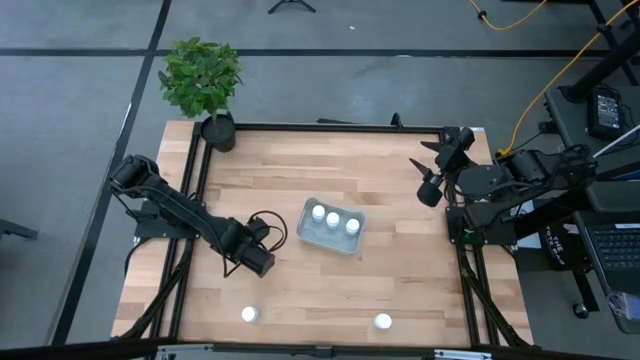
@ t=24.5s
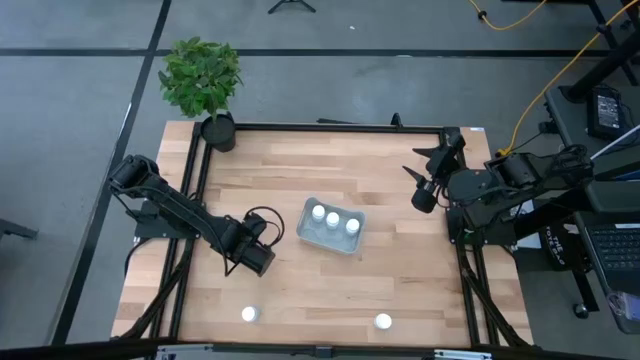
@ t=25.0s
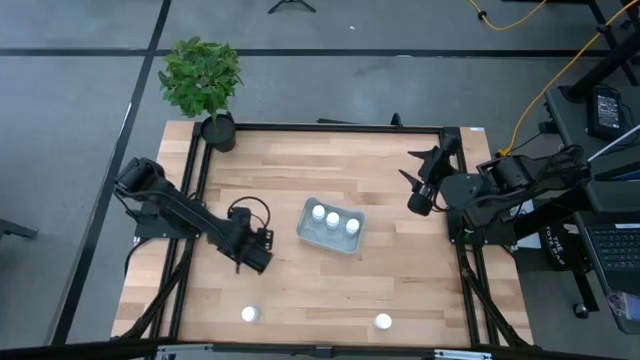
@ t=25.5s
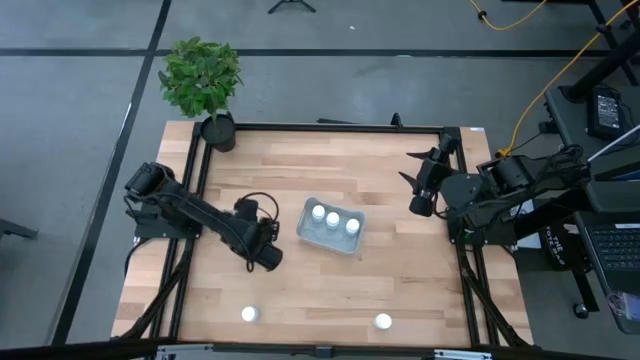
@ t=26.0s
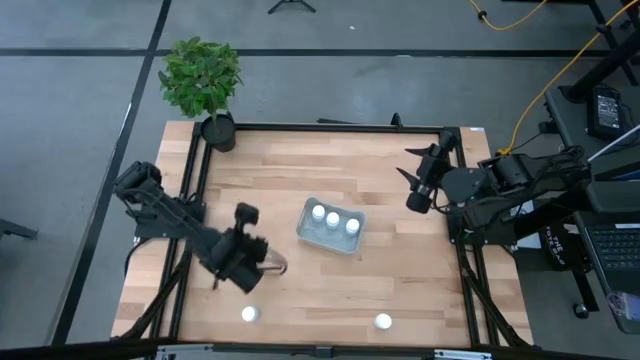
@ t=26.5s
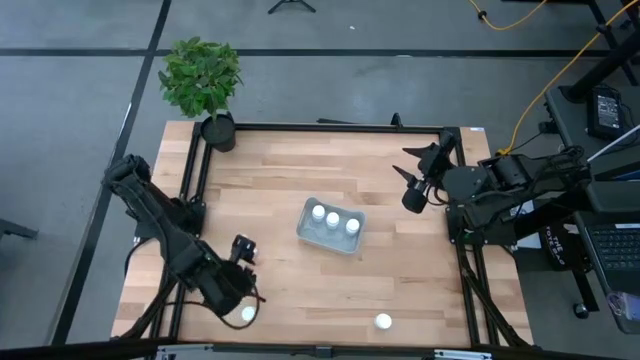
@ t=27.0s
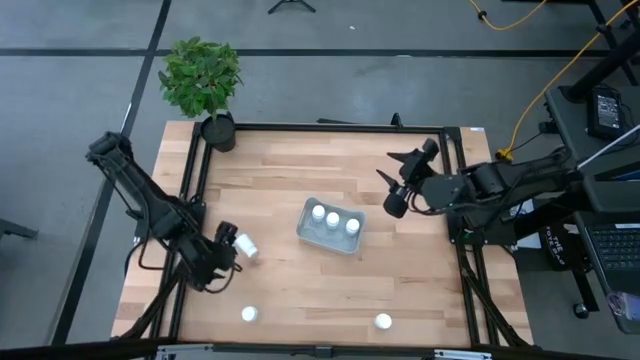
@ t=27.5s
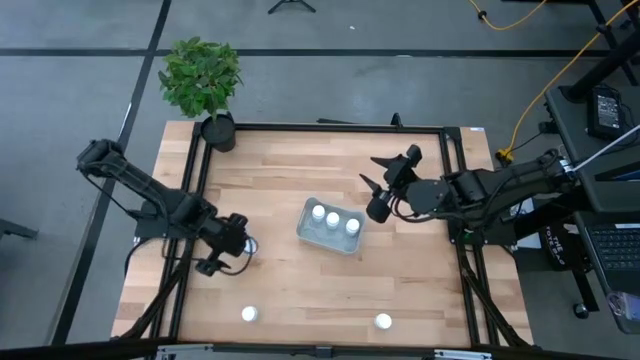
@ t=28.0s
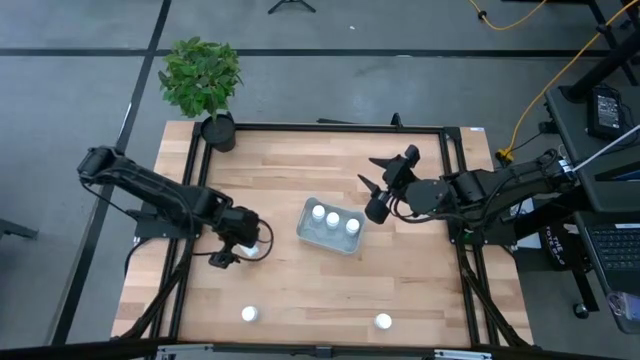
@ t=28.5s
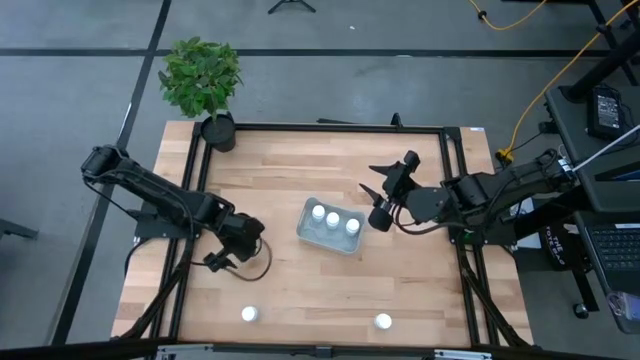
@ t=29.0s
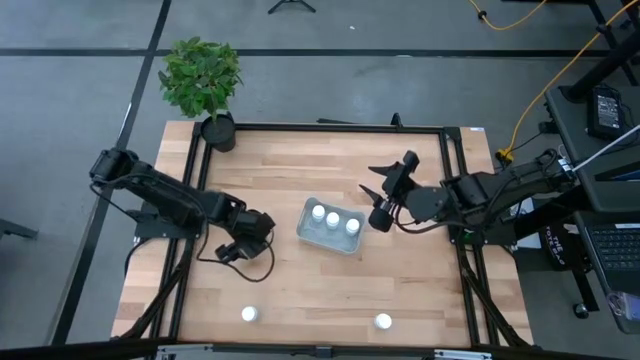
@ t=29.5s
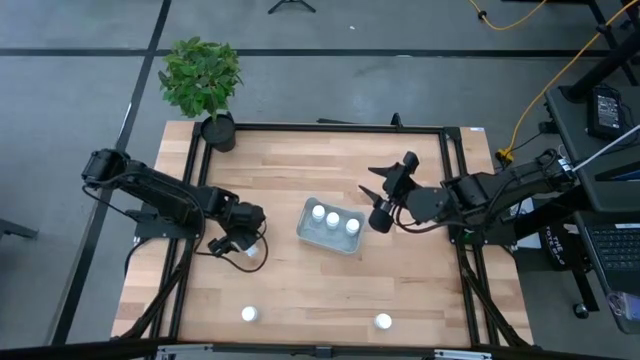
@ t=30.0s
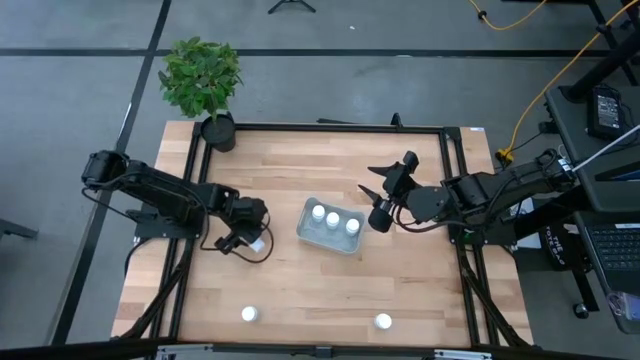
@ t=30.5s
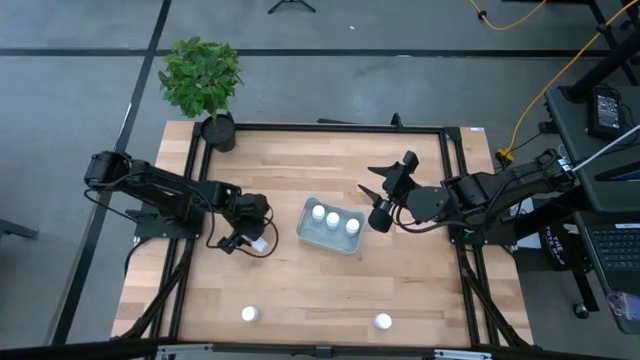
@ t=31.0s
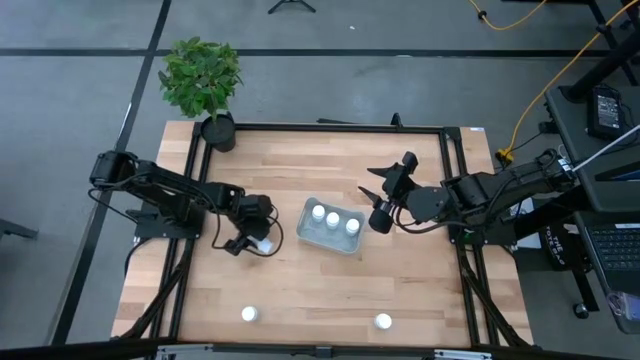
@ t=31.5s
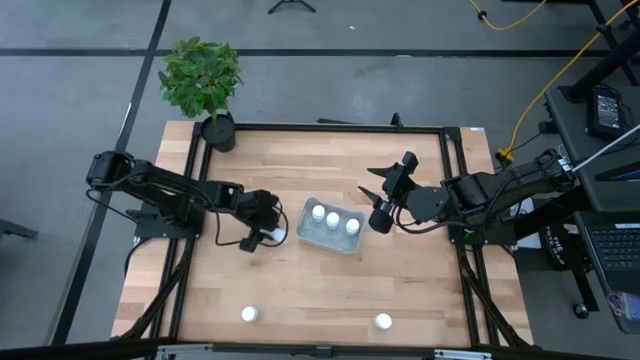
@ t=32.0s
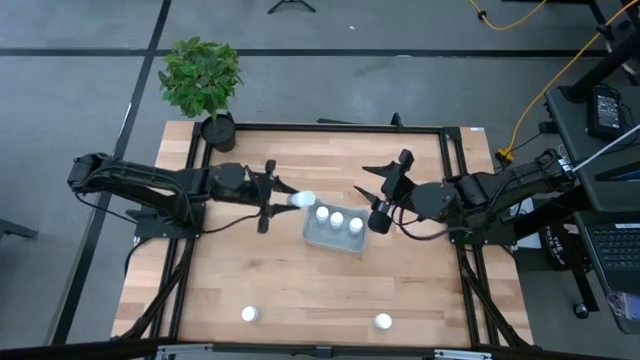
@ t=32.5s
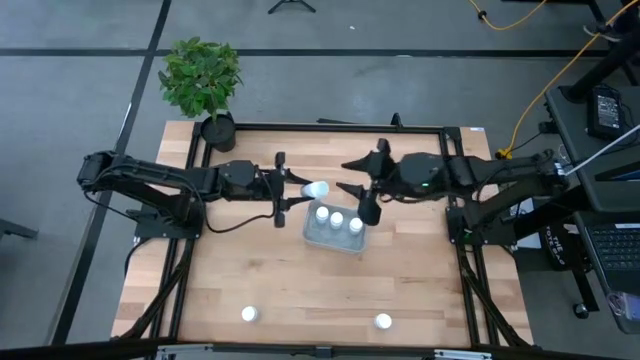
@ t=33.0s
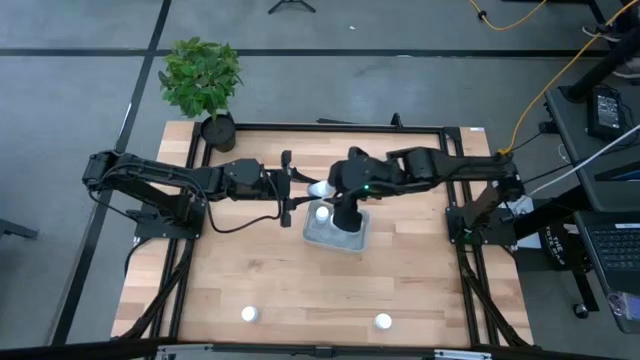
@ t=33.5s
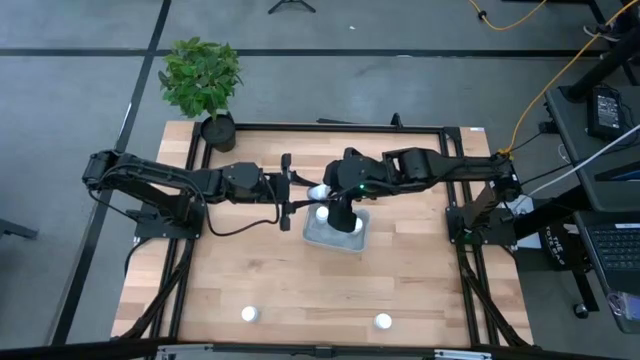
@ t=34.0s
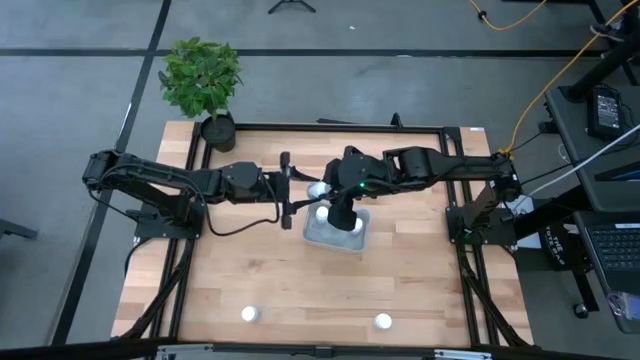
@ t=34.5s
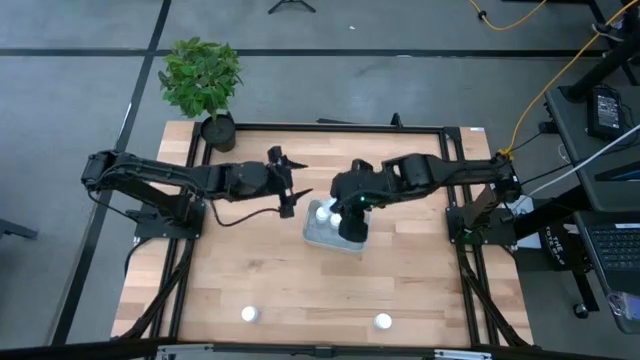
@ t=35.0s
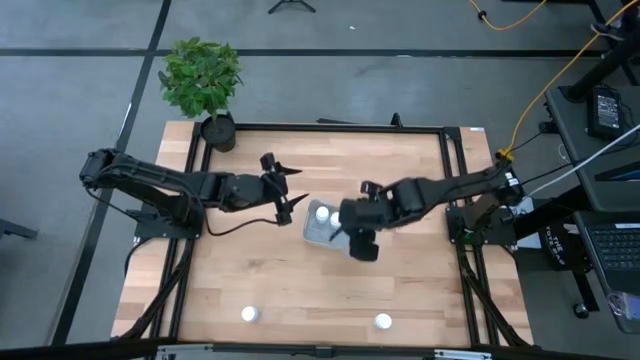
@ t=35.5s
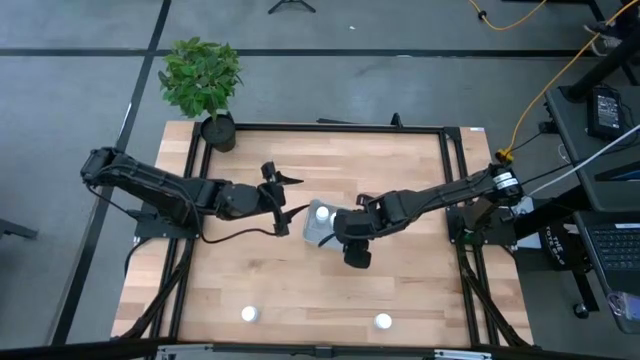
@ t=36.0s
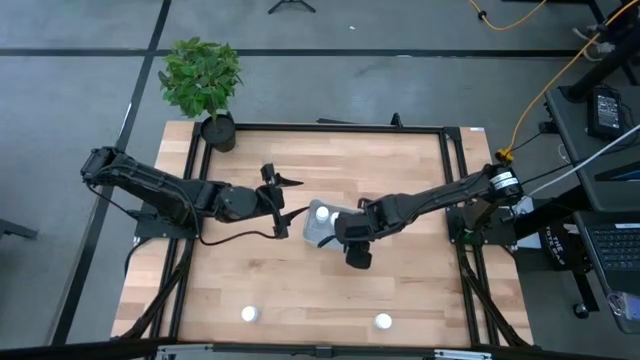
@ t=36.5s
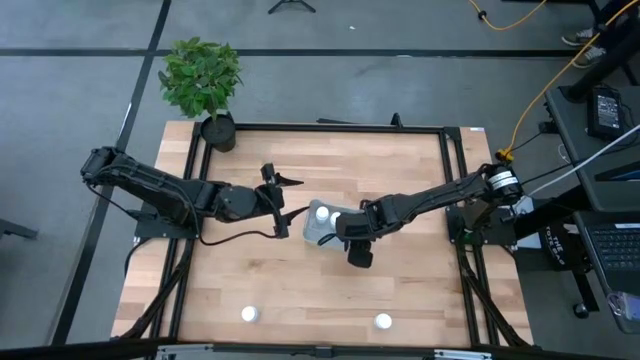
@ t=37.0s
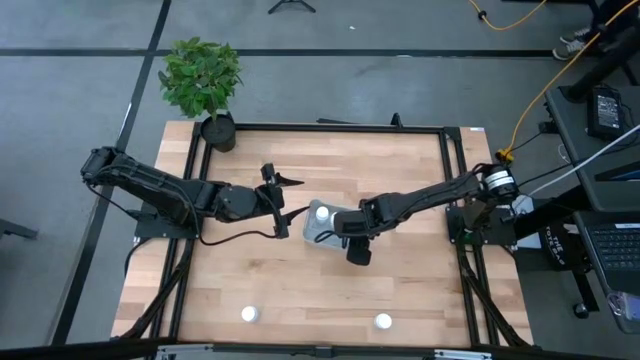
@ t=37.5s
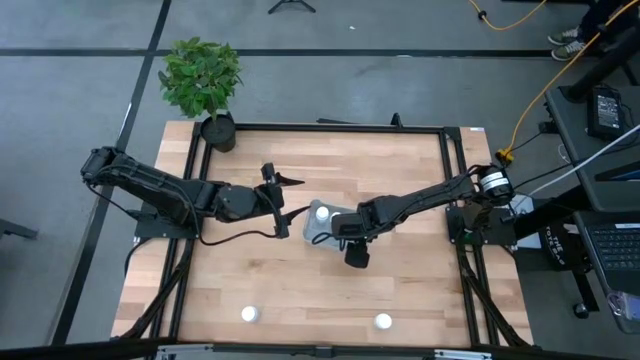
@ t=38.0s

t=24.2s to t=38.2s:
Task: Pick and place pill bottles into a basket
Put the white pill bottle into the gray bin

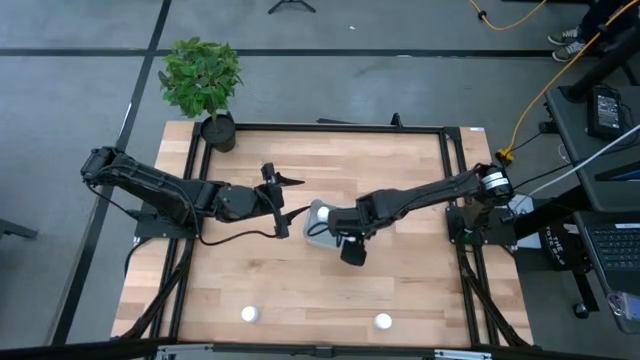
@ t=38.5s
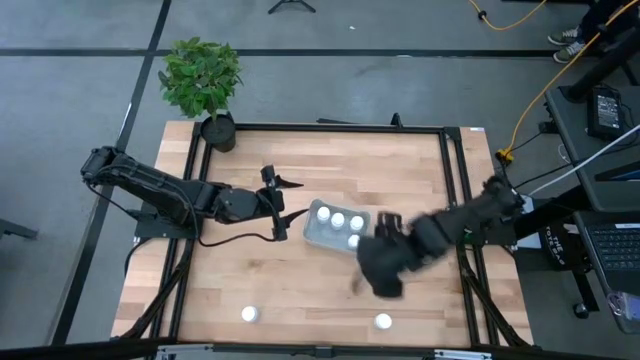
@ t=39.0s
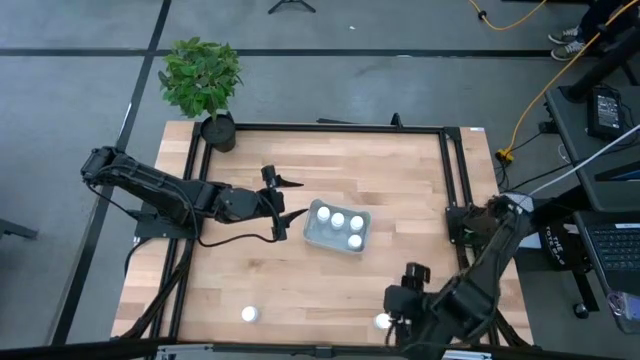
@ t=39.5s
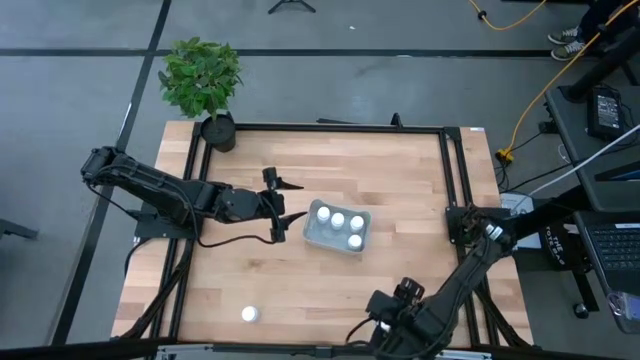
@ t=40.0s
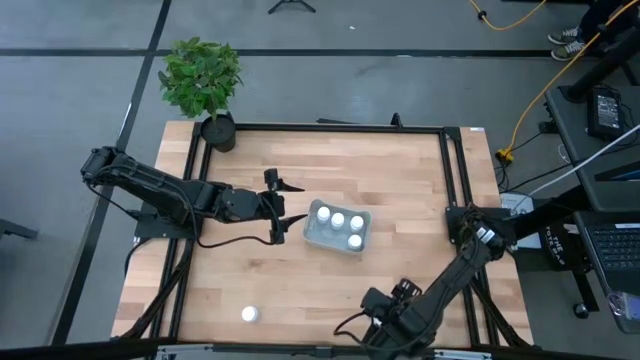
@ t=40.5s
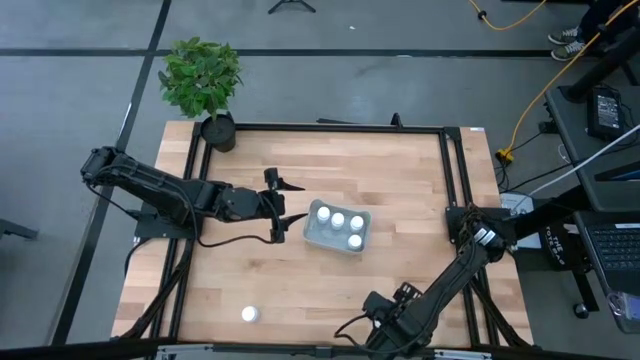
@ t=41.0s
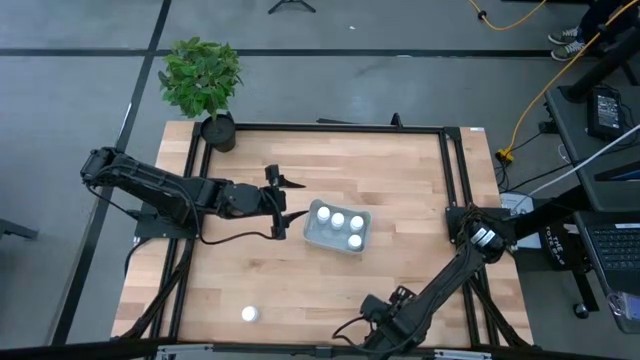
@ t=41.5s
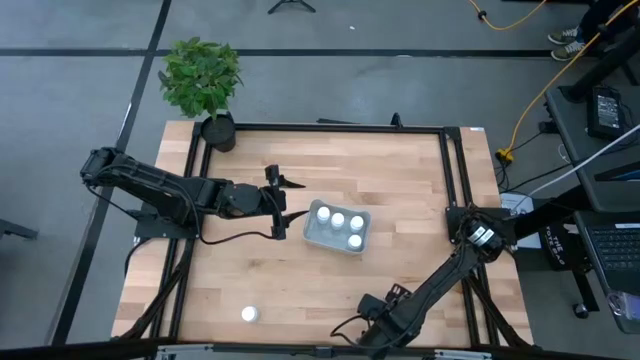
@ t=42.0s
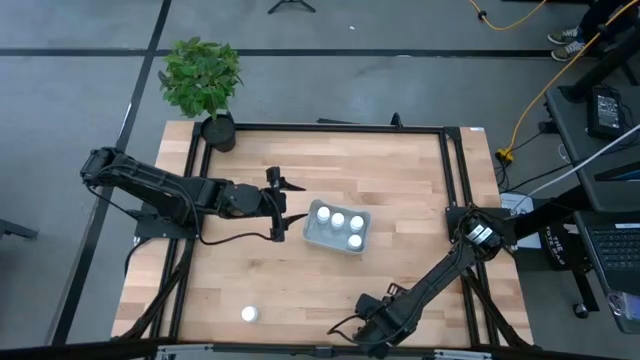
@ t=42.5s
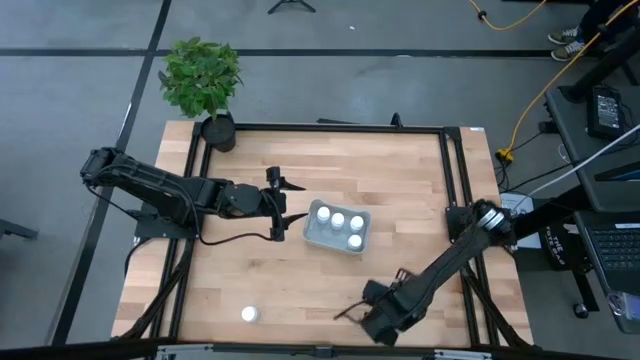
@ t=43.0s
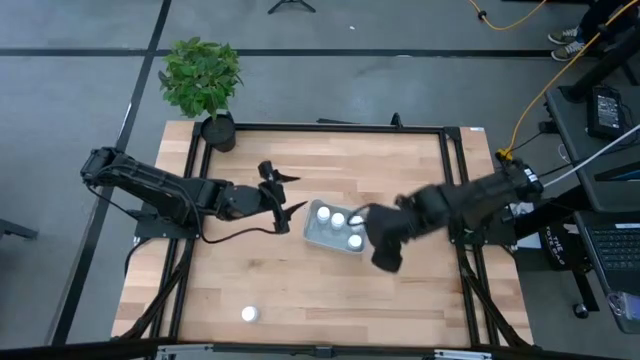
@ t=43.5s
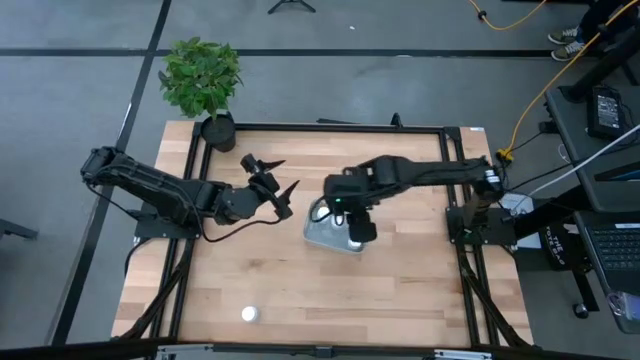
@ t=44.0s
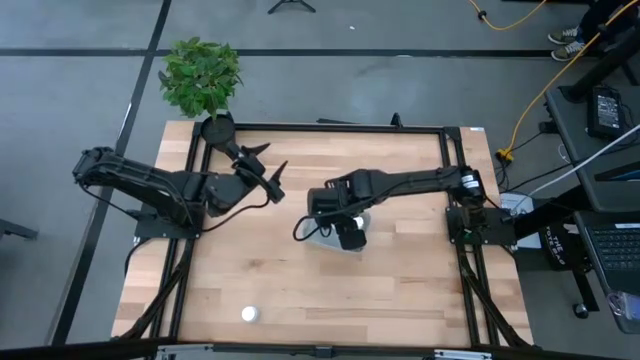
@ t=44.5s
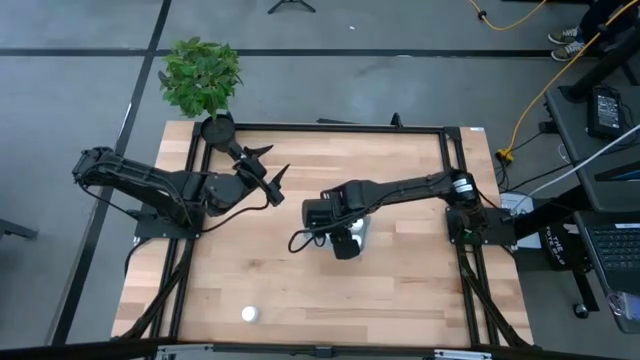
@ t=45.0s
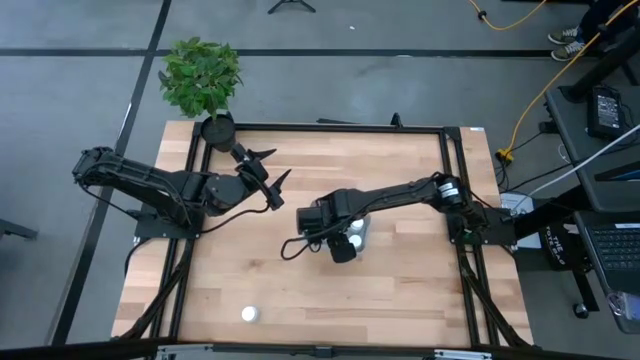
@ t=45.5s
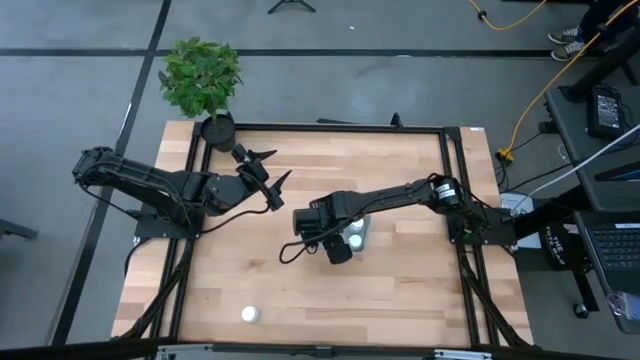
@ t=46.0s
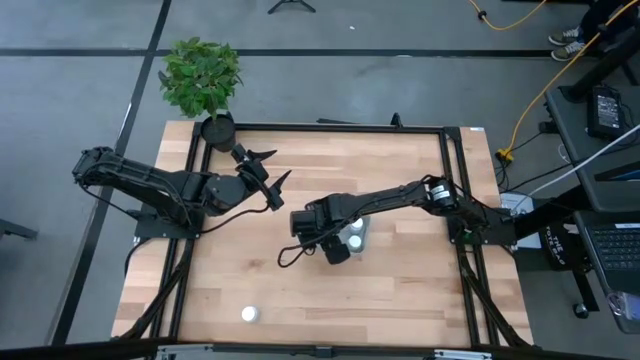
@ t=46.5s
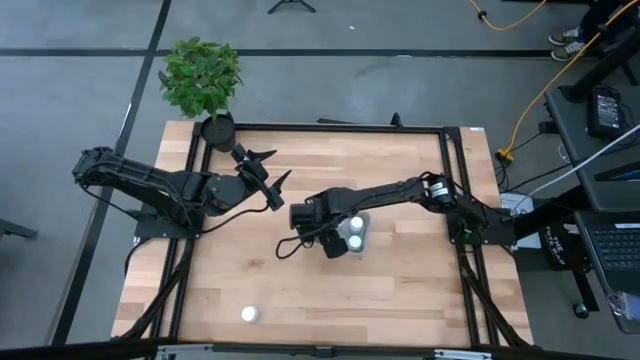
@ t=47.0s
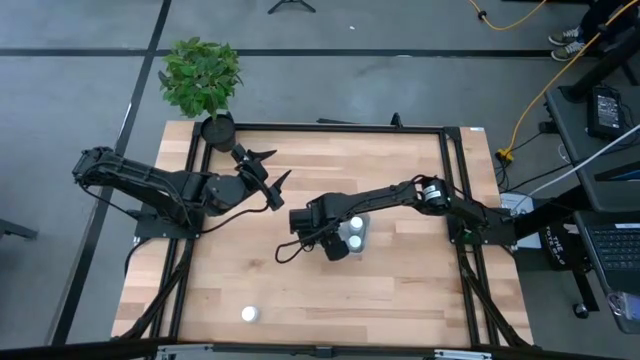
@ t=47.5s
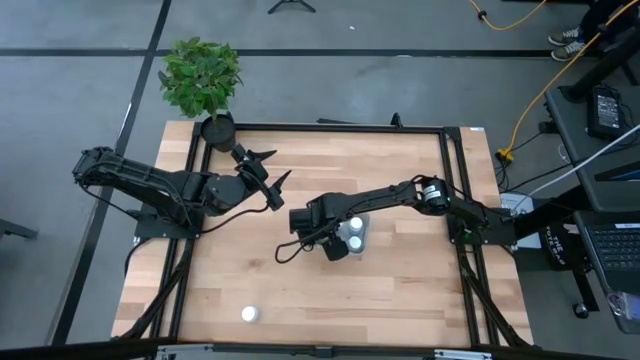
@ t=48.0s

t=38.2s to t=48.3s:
Put the white pill bottle into the gray bin
